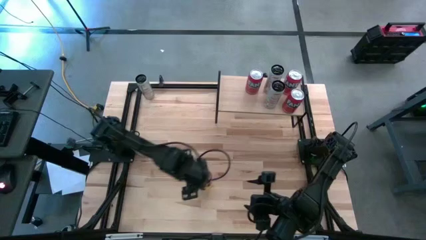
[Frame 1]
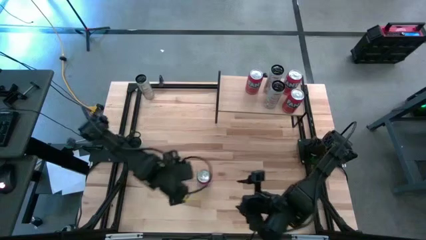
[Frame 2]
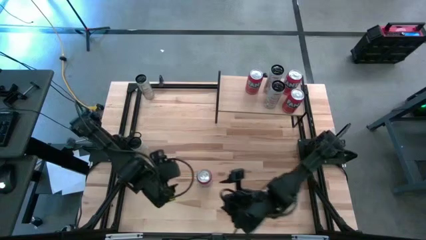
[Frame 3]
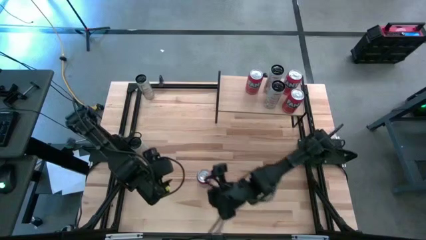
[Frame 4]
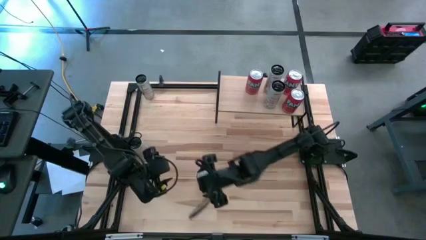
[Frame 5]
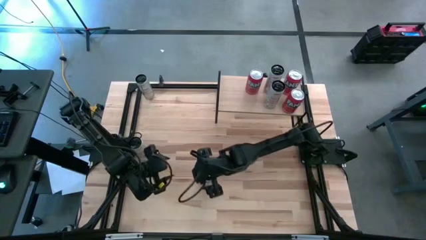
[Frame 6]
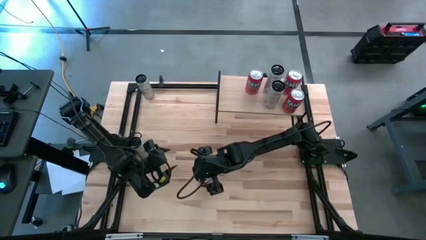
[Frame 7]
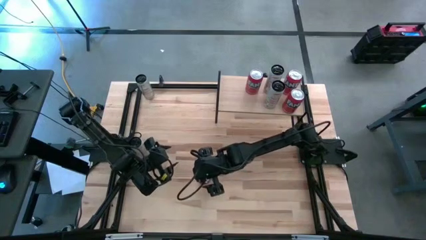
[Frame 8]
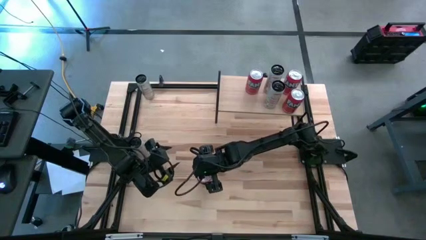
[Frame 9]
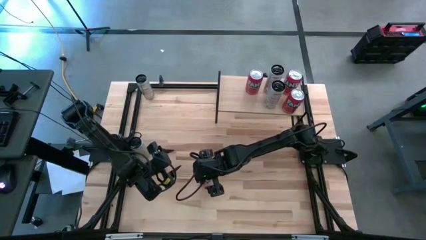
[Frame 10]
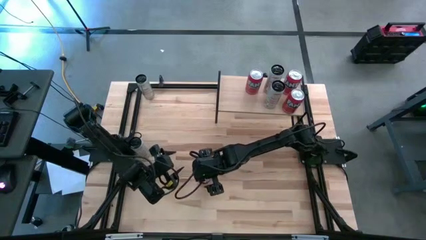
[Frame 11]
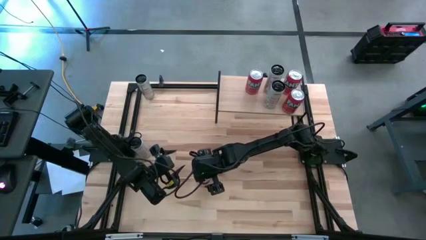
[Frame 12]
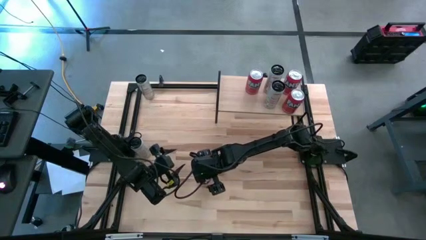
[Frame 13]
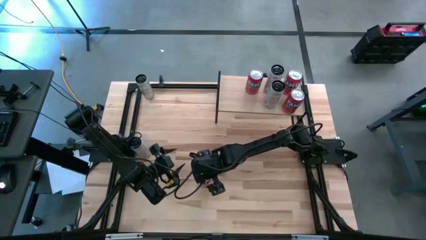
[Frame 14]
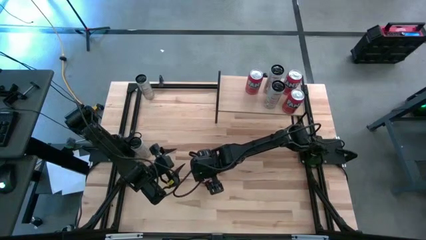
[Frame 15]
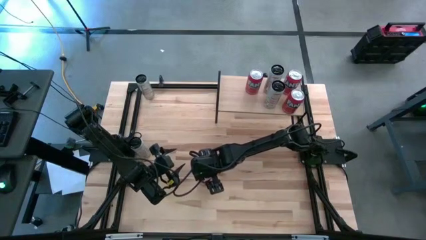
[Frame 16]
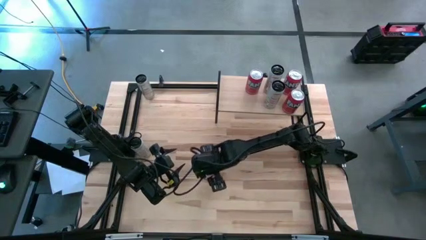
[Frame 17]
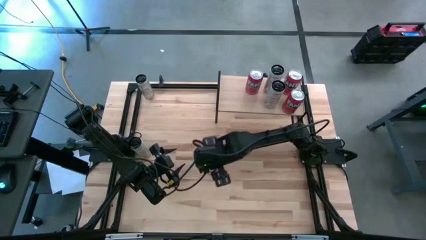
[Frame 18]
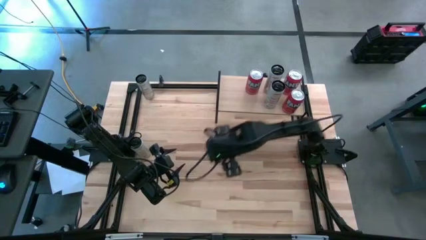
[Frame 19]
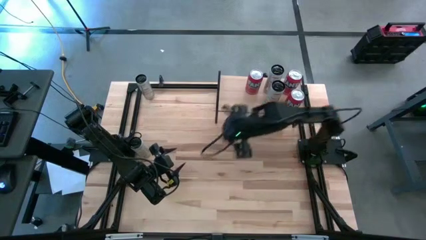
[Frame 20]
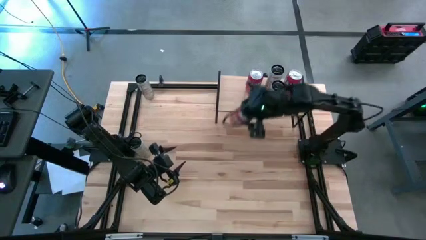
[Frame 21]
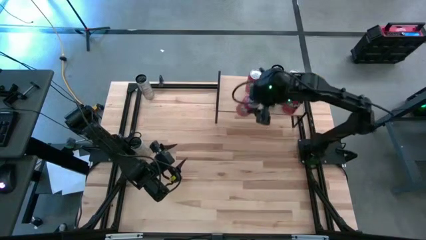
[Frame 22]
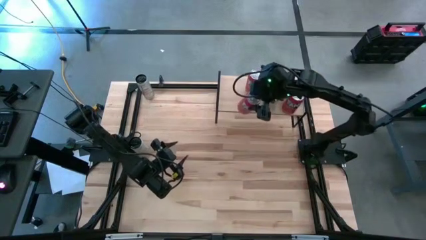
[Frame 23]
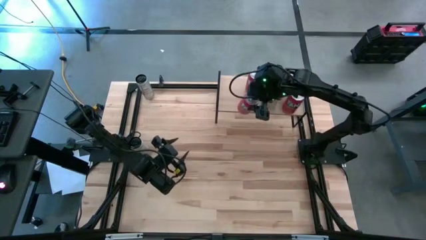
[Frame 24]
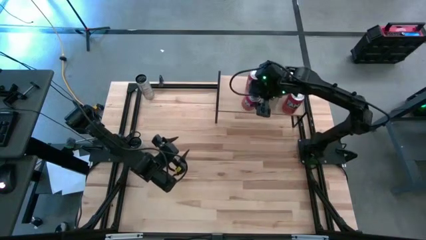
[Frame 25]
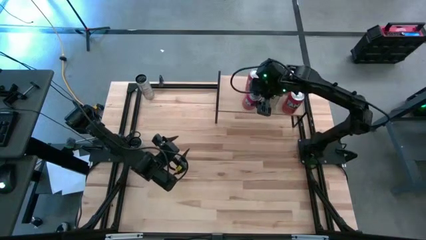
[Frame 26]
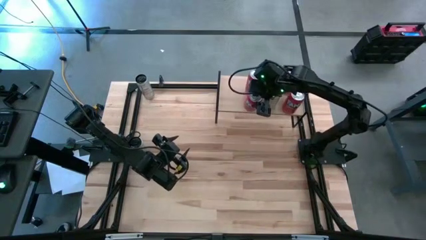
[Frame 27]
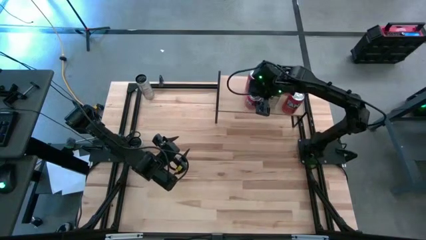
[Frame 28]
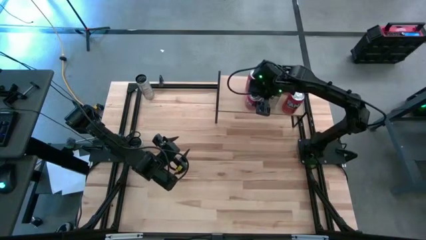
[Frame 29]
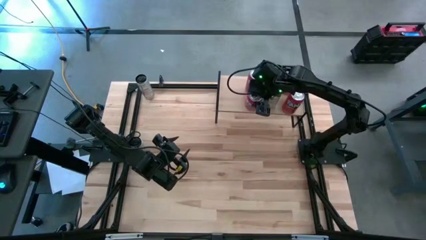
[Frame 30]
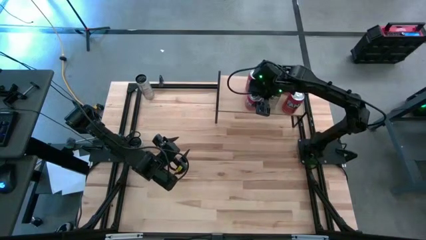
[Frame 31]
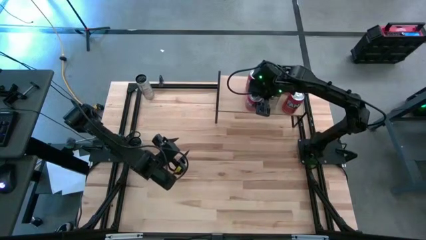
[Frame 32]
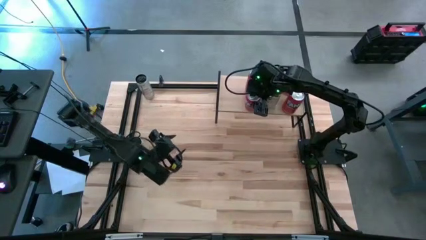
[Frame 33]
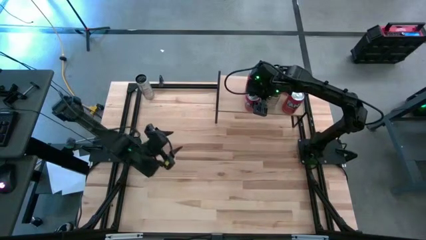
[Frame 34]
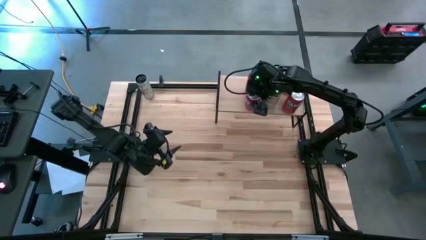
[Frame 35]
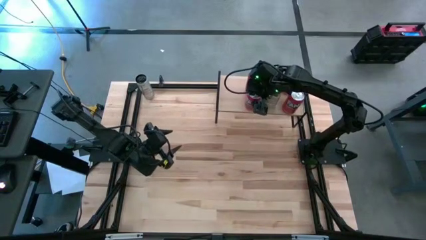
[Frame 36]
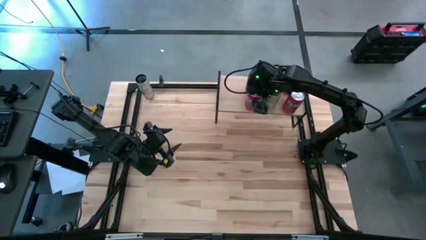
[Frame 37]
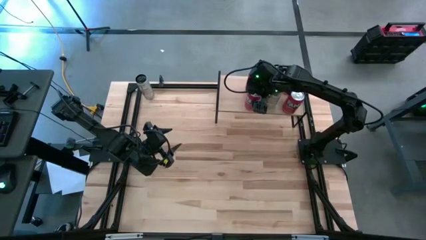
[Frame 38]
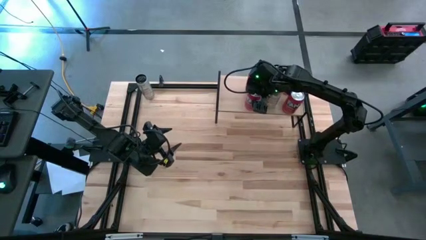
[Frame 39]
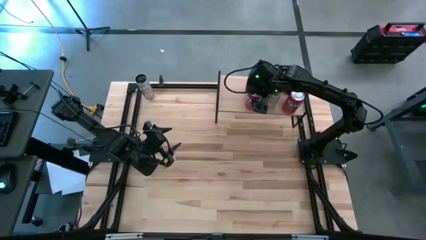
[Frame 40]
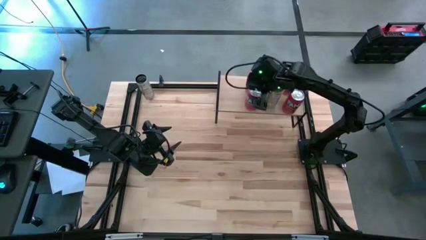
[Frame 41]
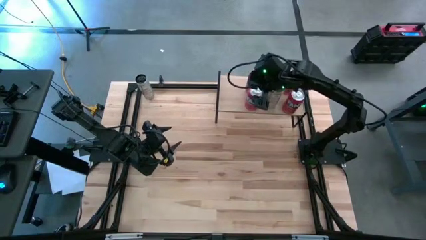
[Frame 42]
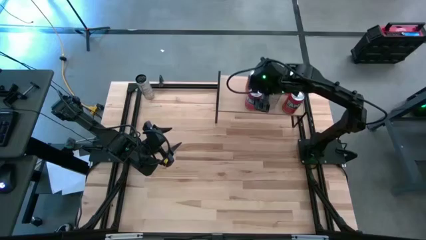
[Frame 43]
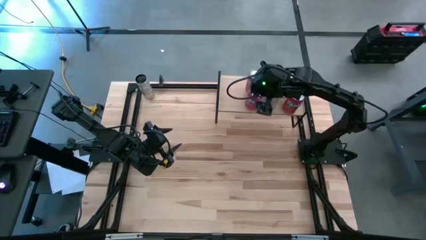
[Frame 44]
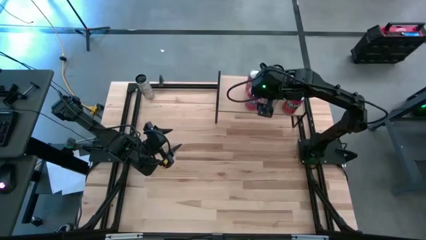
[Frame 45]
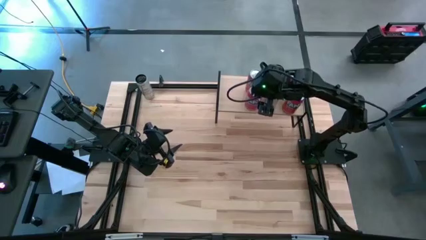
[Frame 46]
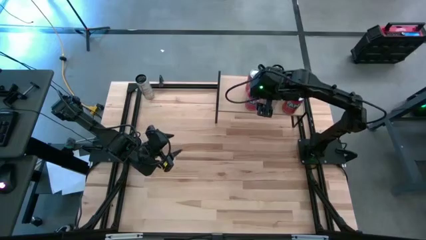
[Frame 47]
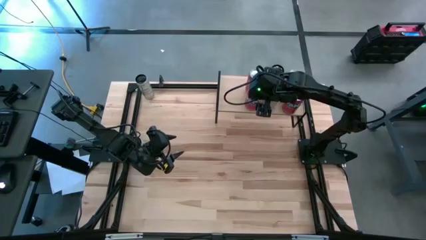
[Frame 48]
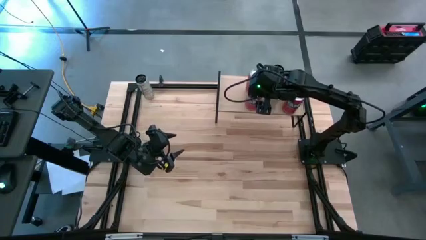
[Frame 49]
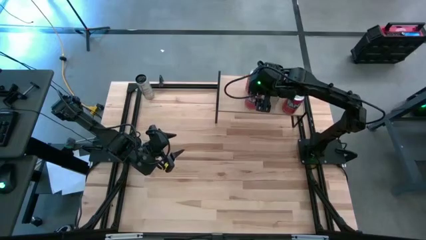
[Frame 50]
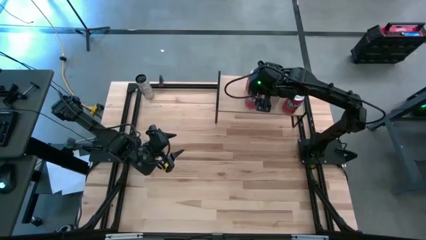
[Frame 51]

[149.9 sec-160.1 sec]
Task: Place canned beverage on shelf
Put the orange soda can on the shelf aligned with the other orange soda can

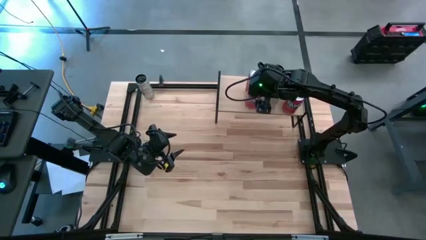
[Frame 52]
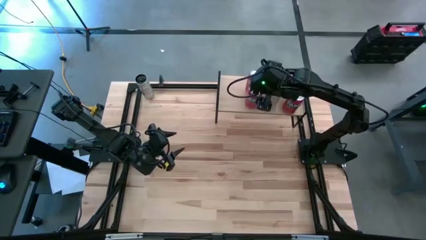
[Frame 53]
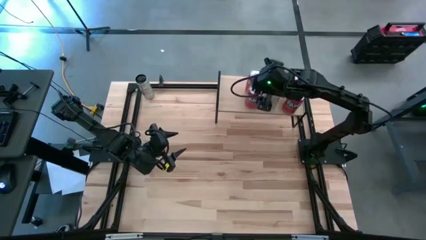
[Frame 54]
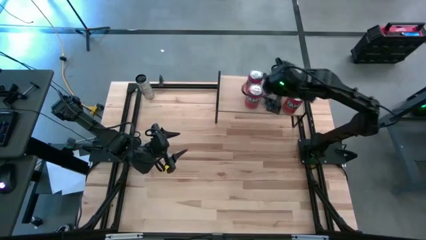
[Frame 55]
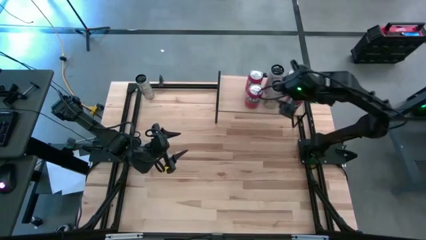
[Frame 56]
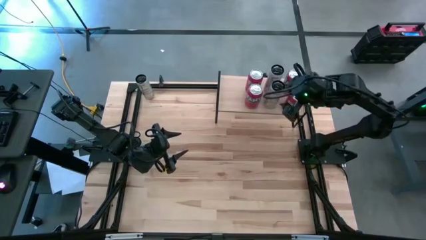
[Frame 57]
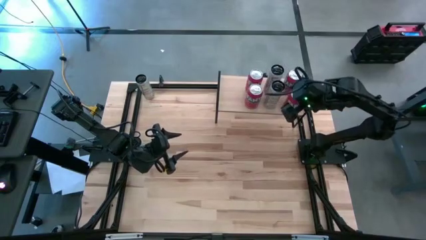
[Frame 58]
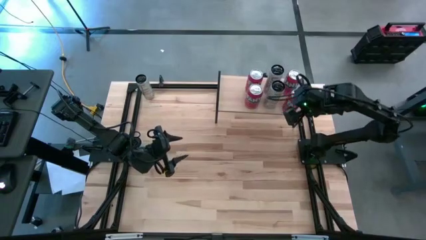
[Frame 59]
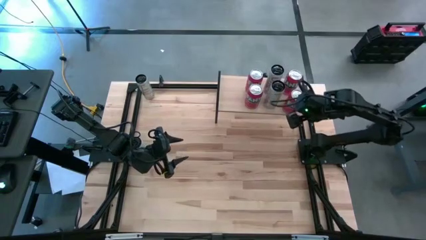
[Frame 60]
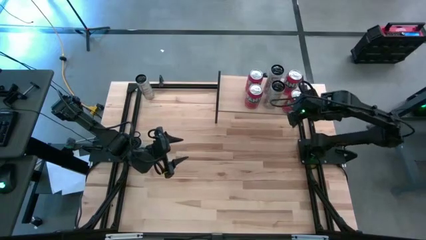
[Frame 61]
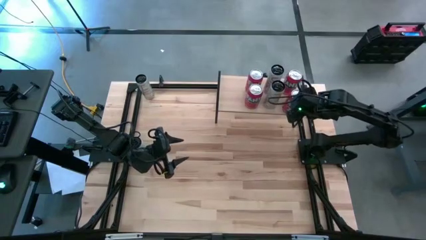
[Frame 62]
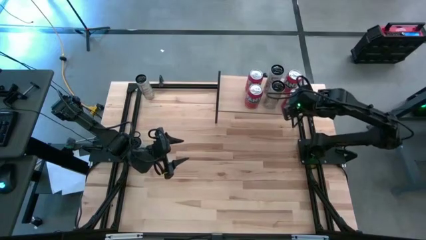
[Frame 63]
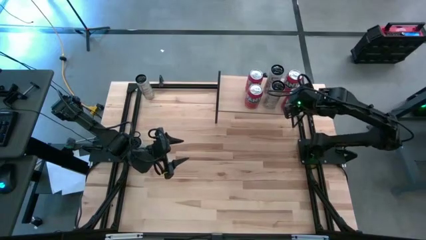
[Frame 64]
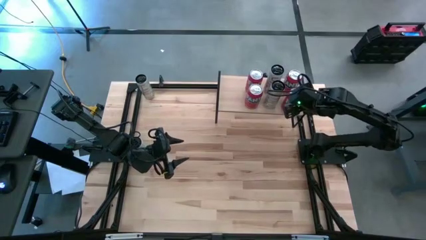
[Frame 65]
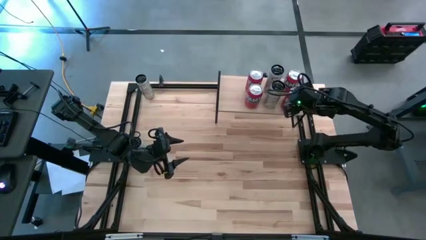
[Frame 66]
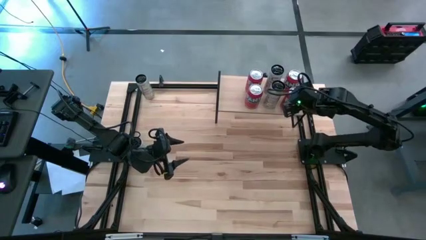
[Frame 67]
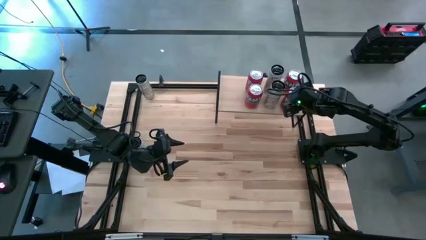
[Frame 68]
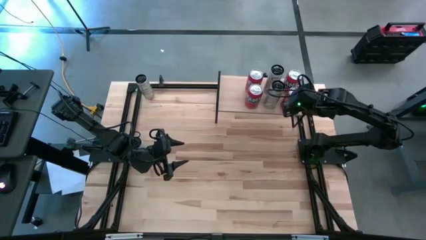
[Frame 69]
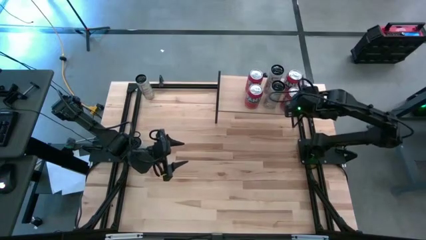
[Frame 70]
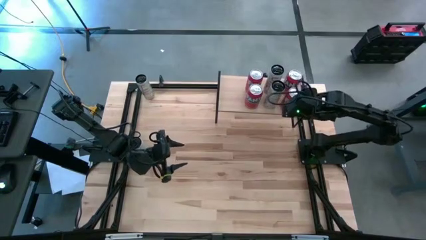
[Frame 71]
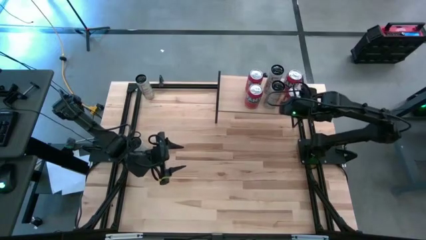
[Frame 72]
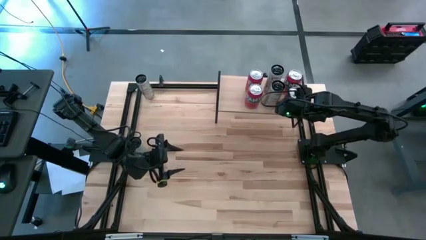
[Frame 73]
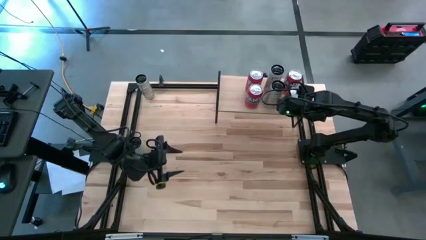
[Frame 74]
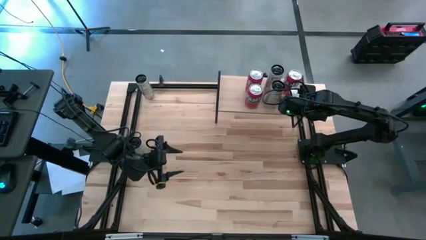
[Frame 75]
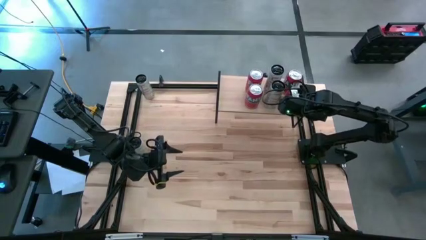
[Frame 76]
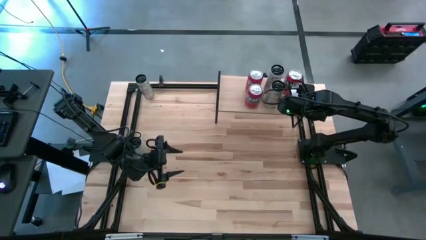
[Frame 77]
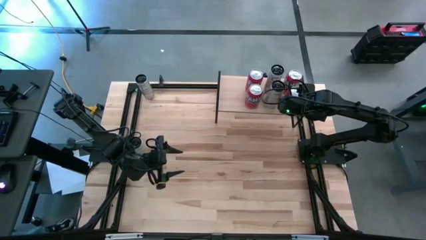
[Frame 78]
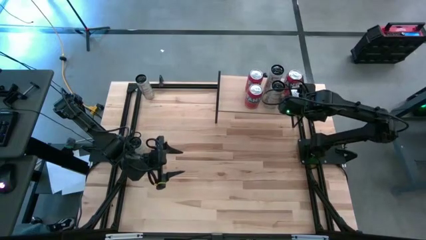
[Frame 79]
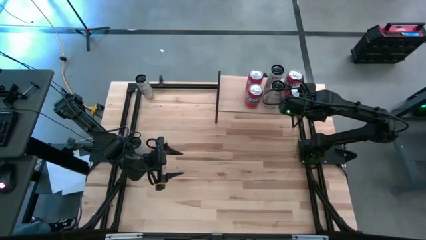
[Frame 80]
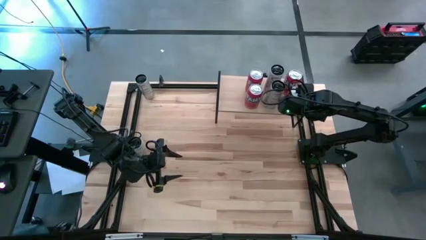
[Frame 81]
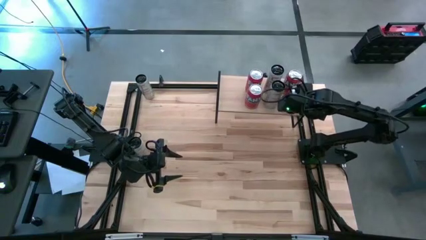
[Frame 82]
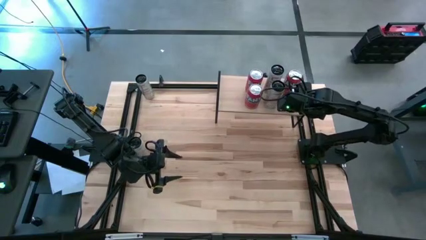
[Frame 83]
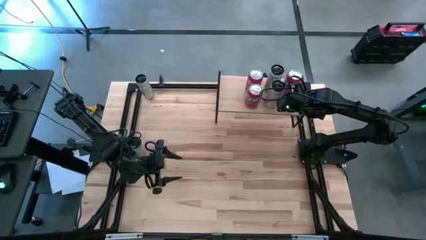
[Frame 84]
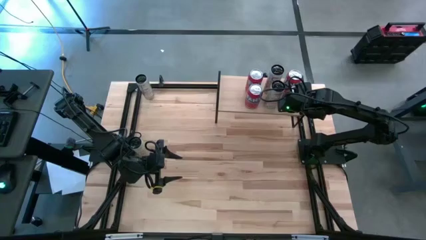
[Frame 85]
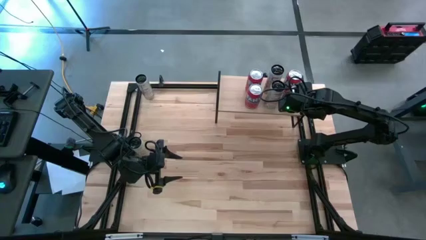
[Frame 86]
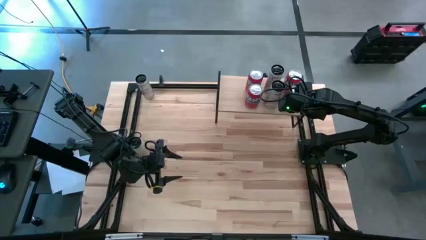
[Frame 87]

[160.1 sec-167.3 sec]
Adjust the orange soda can
